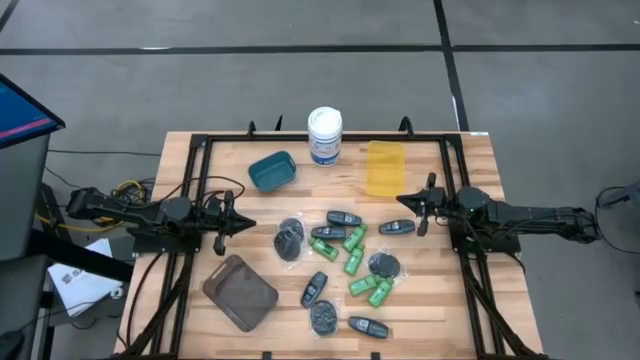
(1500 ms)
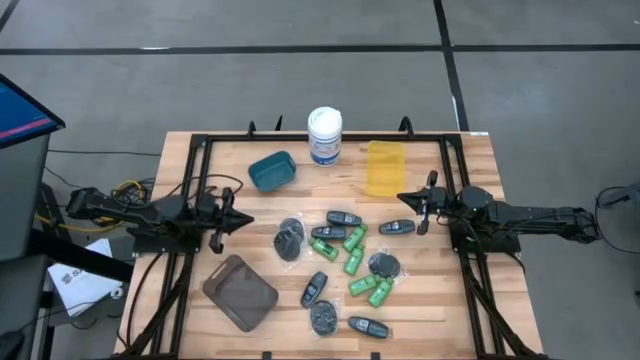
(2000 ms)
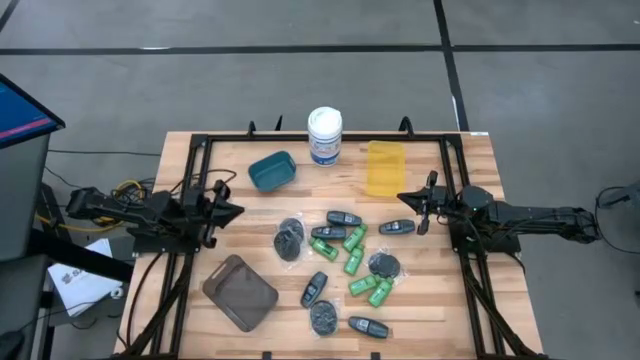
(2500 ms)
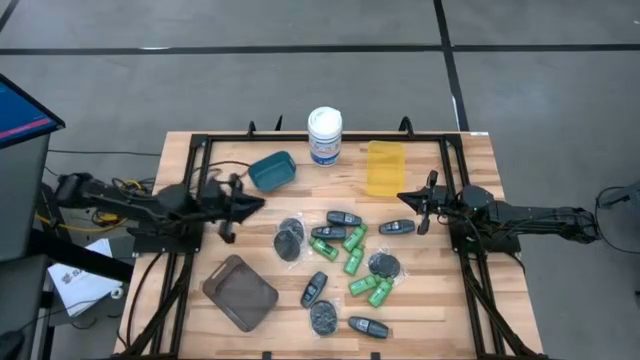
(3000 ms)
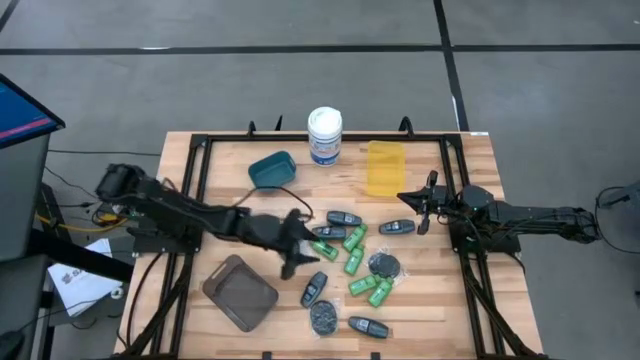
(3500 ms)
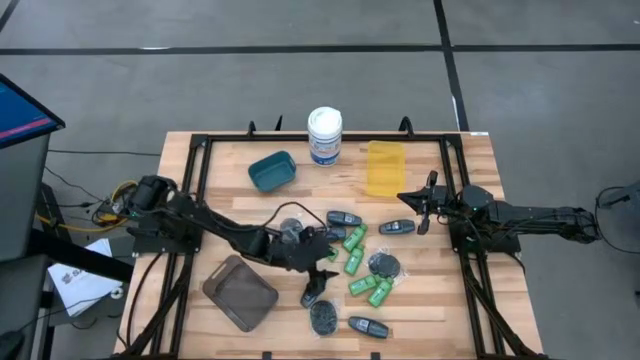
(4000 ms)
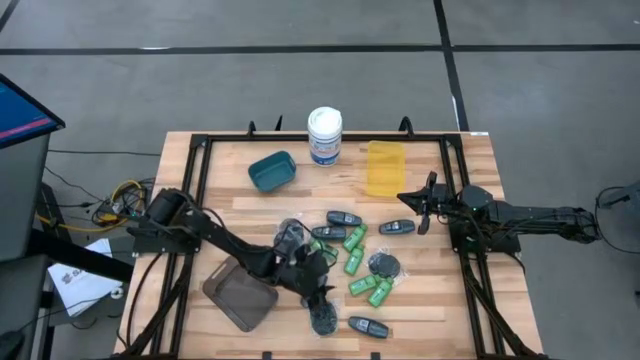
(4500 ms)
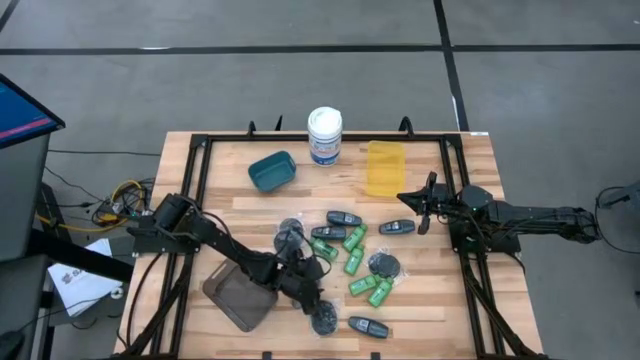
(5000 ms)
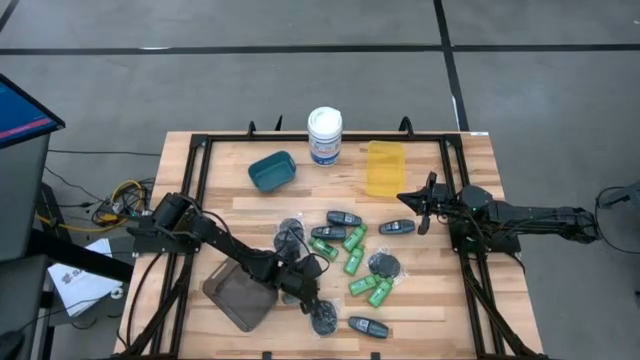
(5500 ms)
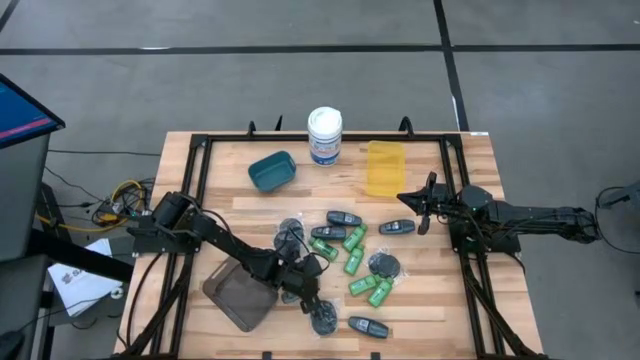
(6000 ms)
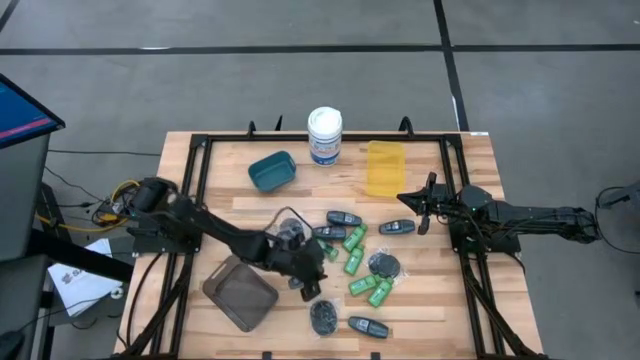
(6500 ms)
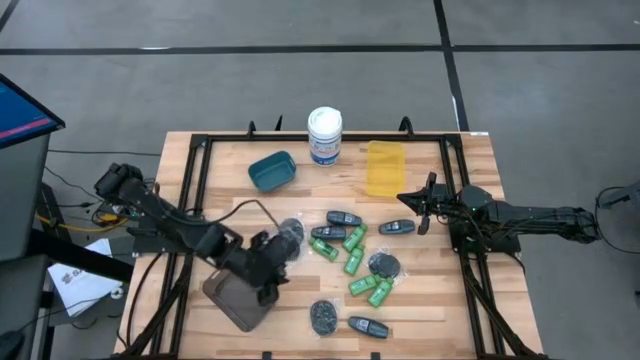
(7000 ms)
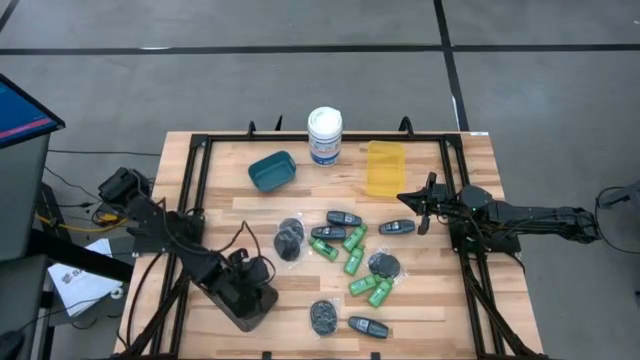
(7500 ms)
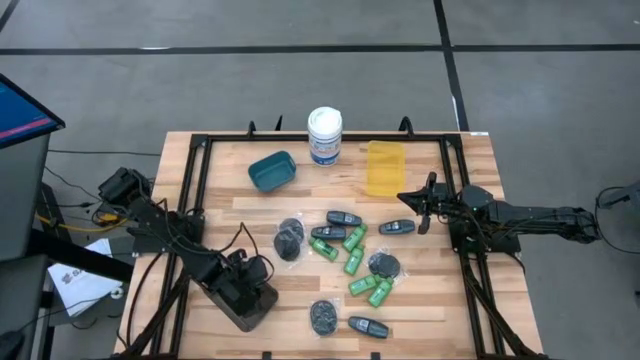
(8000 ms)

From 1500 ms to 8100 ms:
Task: Pick & Place Travel size toiletries
Put the black deodorant into the black bin

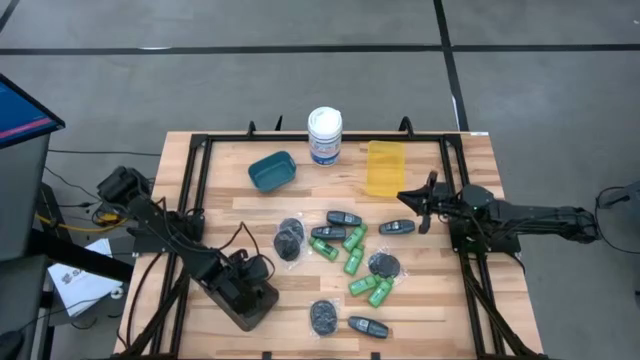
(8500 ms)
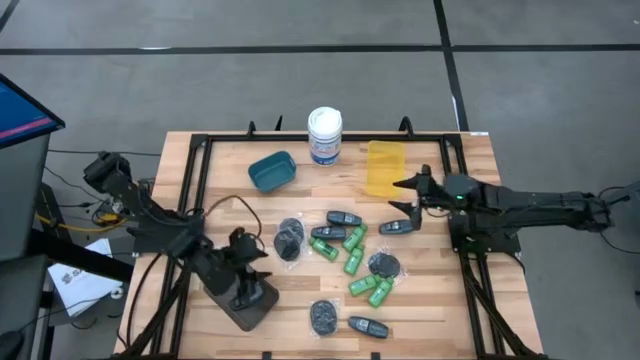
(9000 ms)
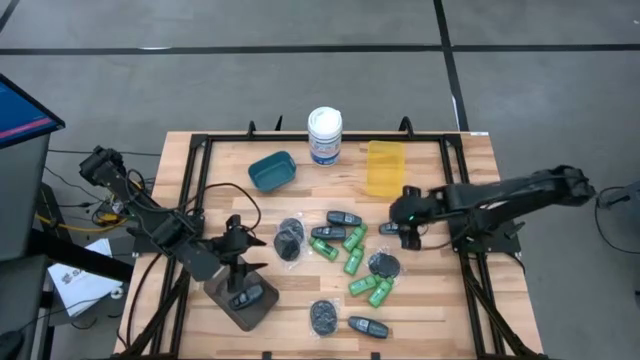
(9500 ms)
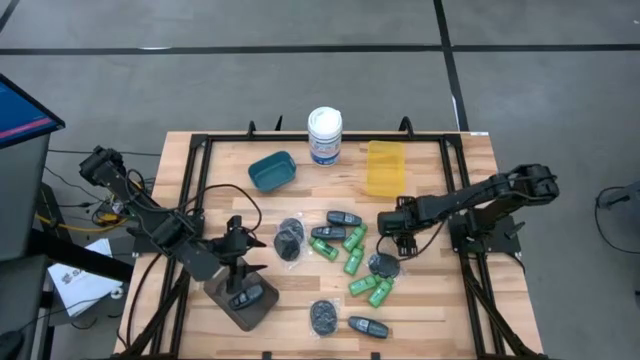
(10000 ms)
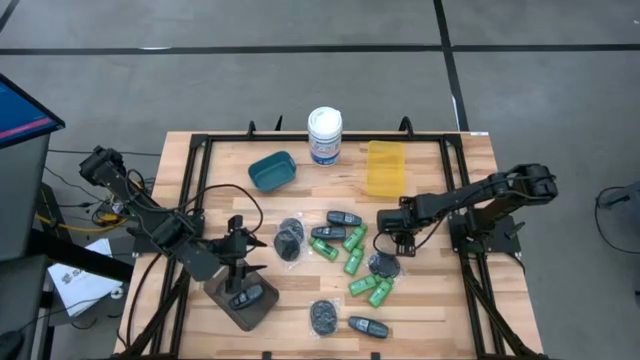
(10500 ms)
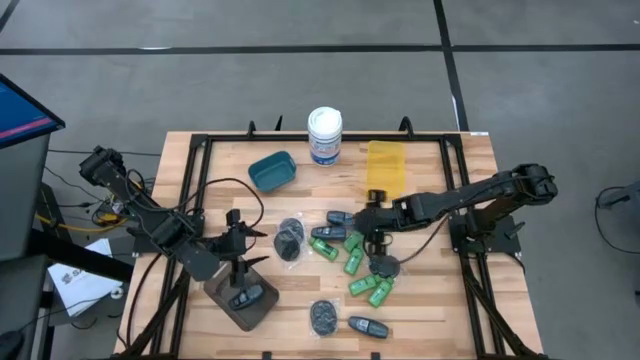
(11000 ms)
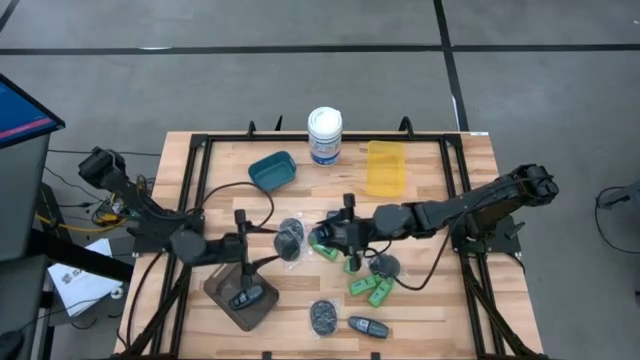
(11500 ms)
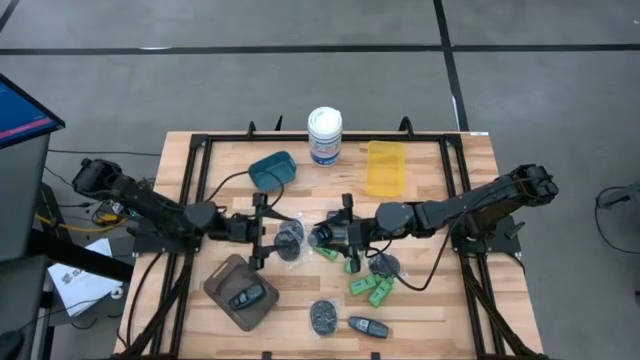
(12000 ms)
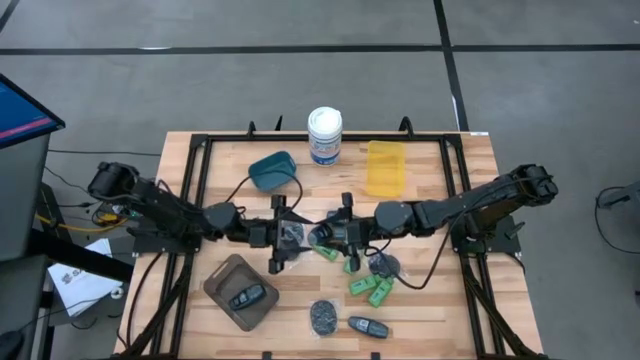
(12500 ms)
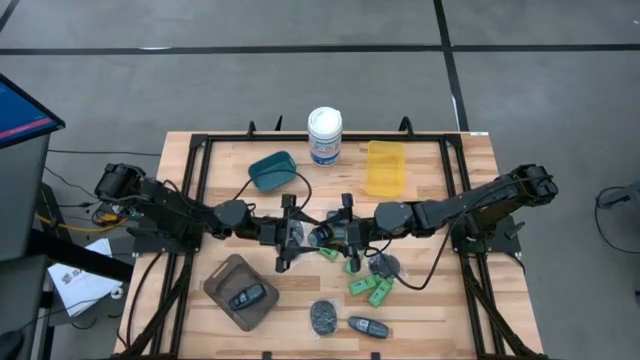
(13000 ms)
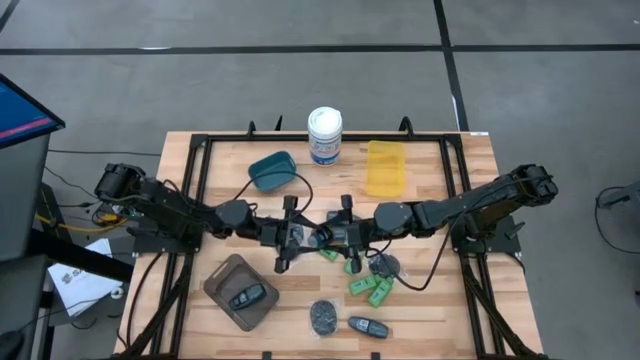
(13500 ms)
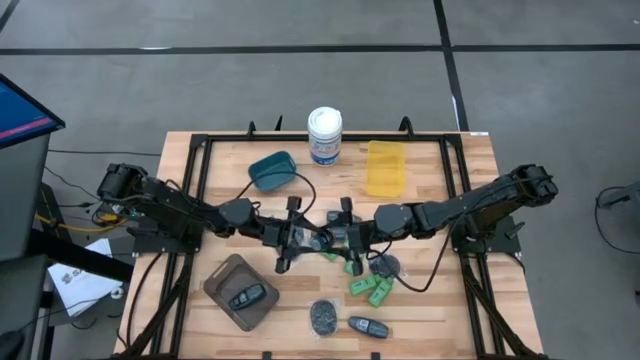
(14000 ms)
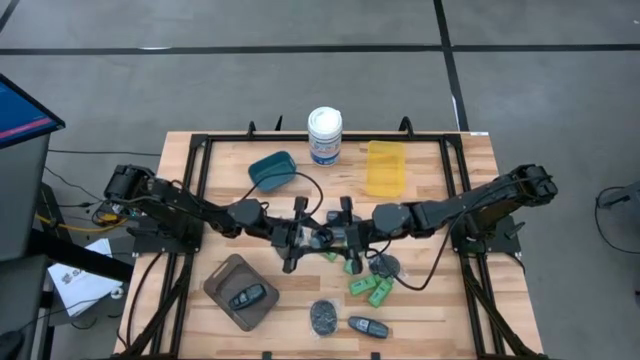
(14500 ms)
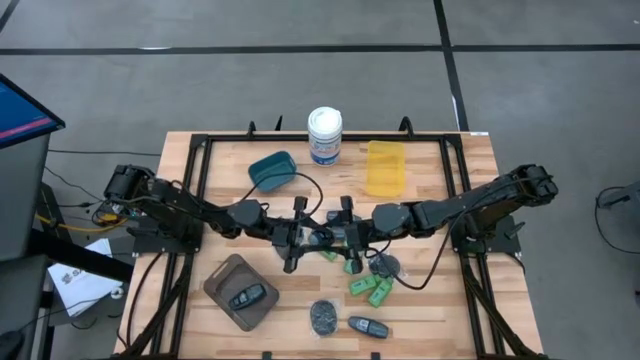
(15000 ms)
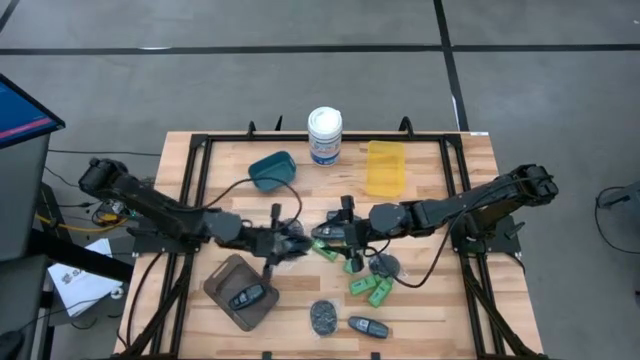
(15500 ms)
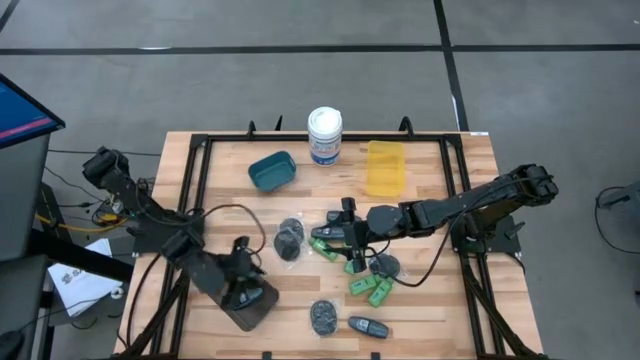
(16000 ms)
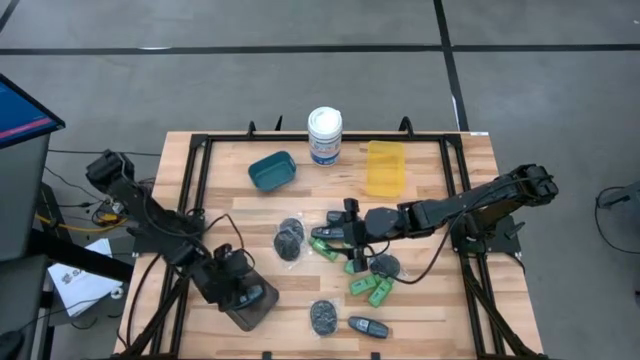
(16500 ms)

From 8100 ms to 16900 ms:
Put the black deodorant into the black bin

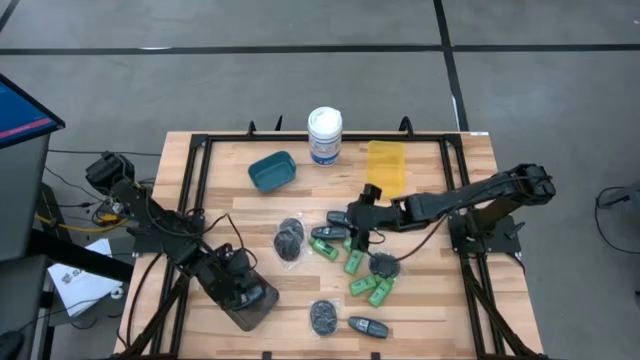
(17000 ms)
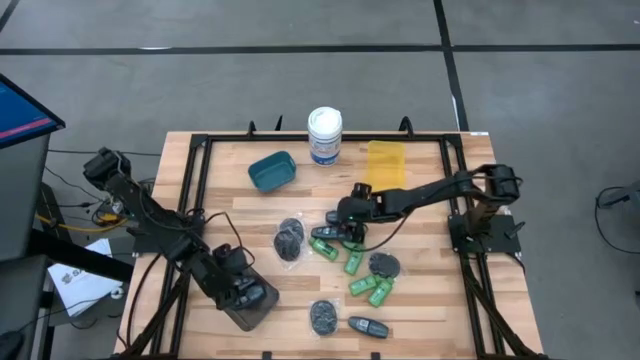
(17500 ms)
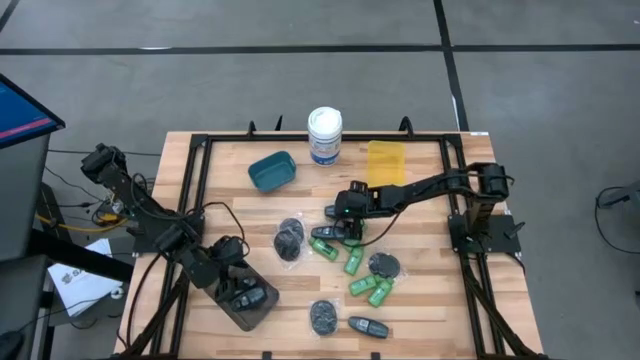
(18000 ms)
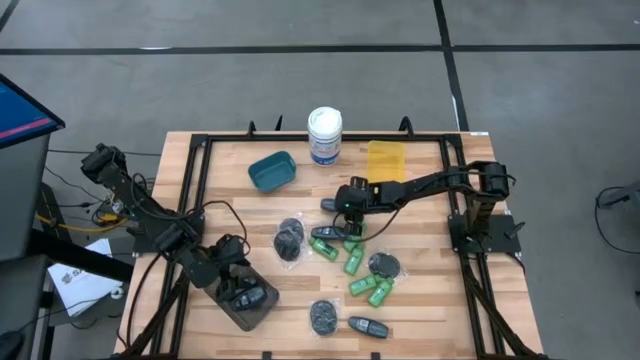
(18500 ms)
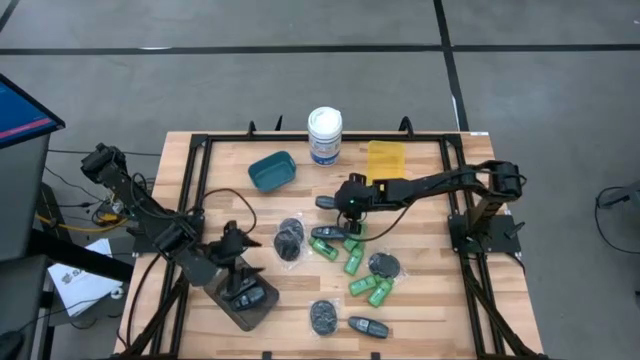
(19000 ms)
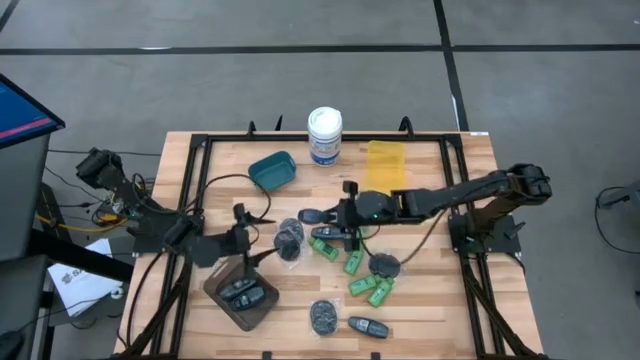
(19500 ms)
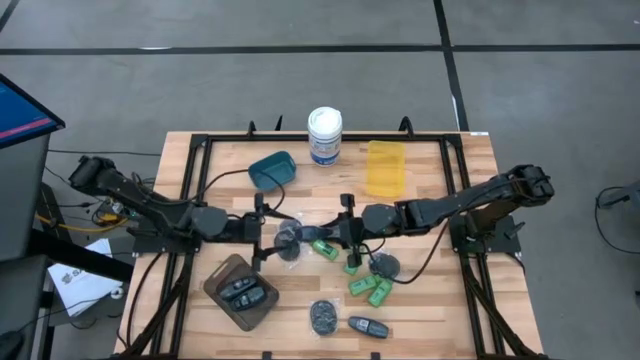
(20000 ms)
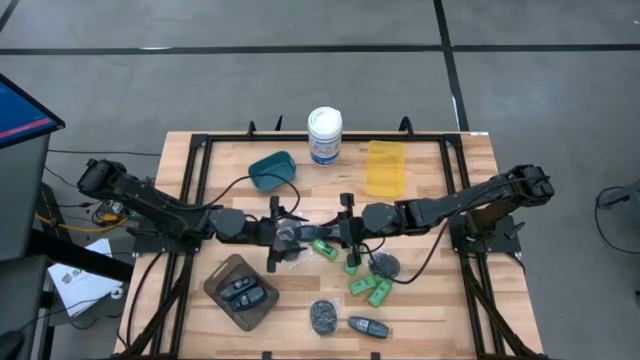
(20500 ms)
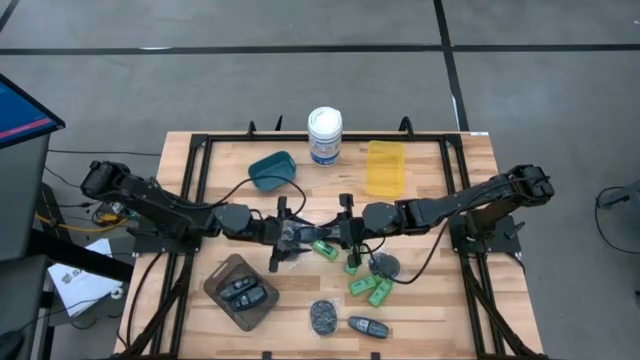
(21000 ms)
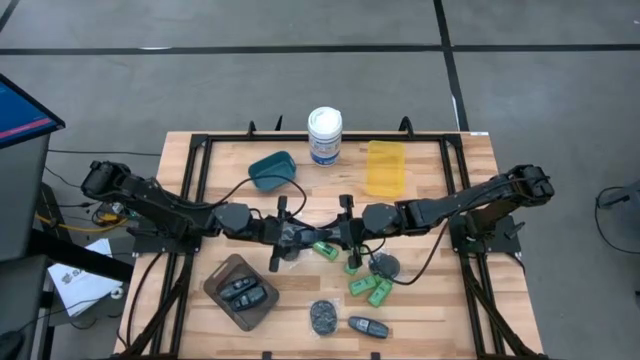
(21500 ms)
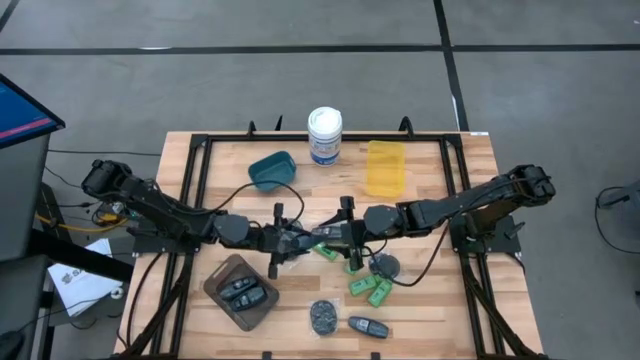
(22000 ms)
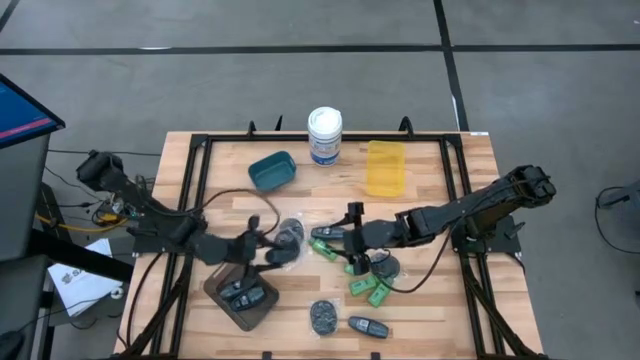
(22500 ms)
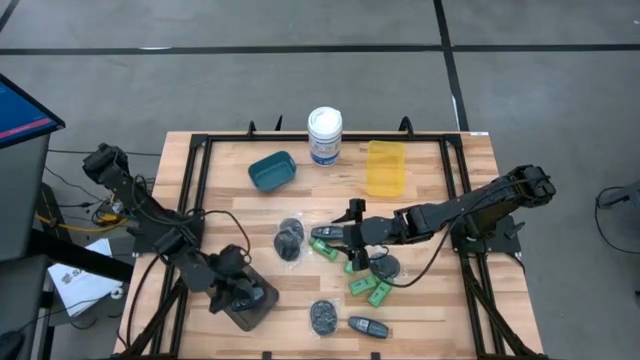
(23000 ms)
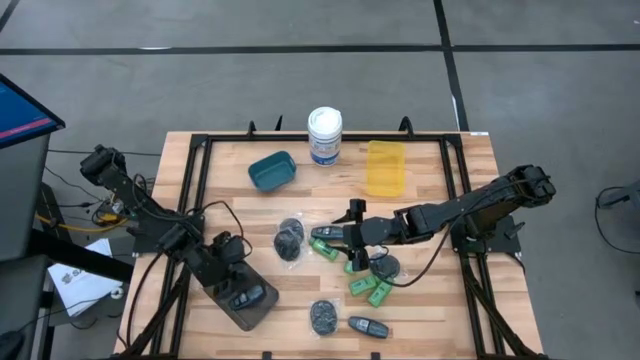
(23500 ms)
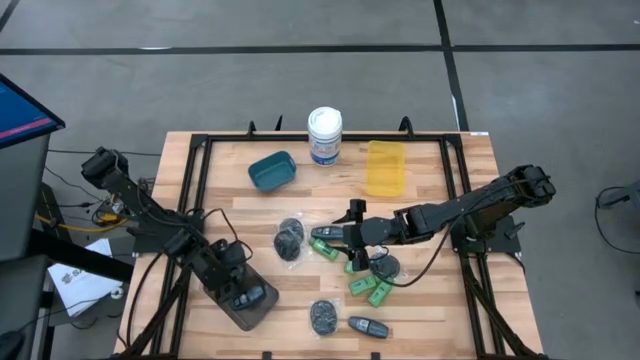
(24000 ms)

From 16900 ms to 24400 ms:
Put the black deodorant into the black bin
